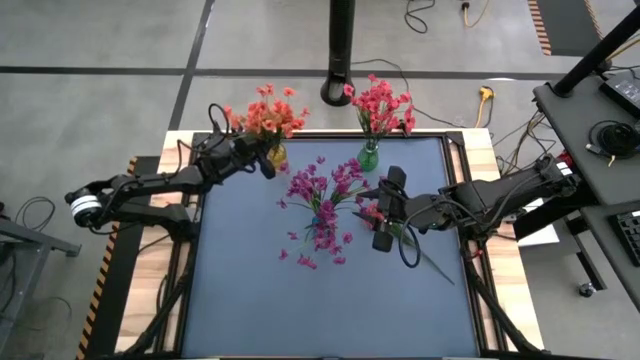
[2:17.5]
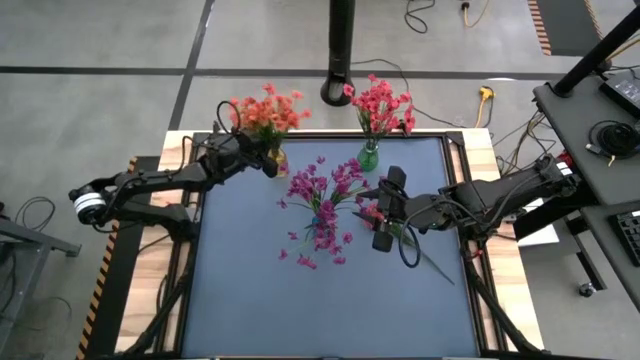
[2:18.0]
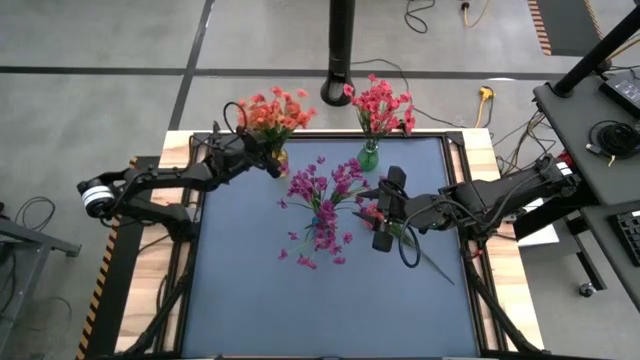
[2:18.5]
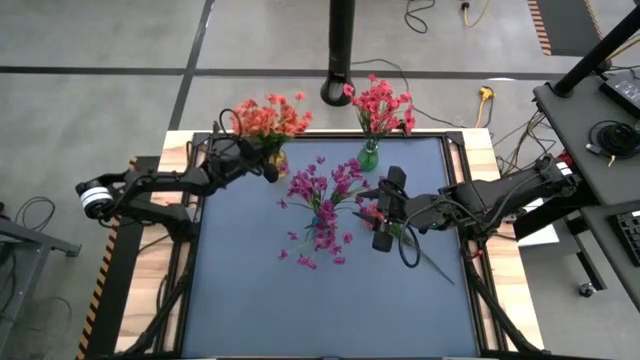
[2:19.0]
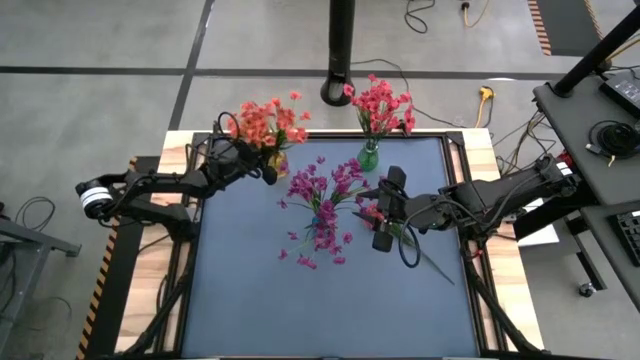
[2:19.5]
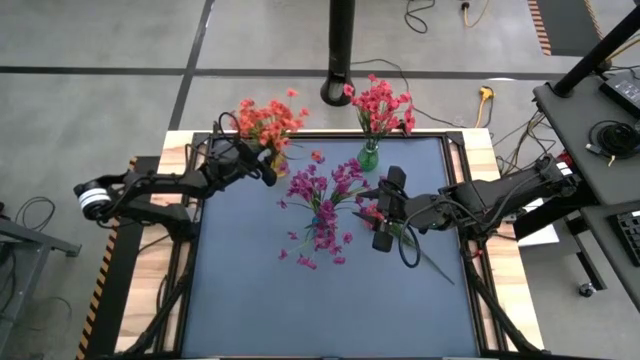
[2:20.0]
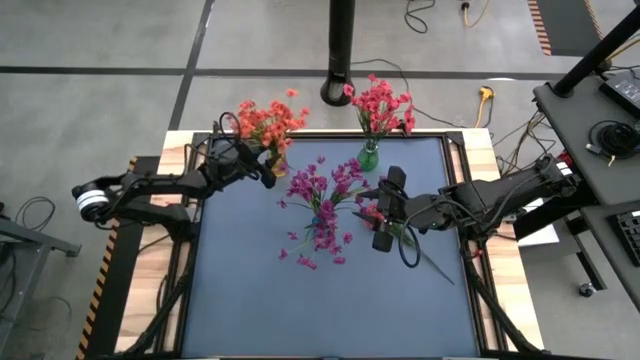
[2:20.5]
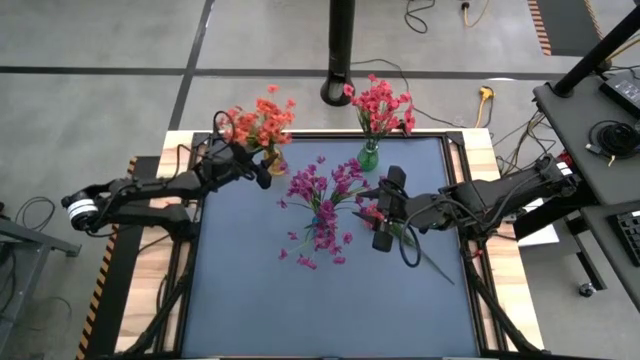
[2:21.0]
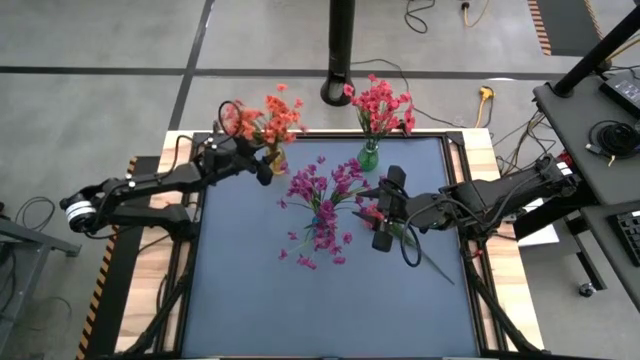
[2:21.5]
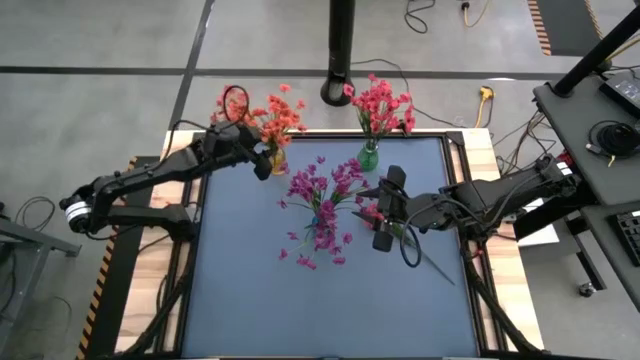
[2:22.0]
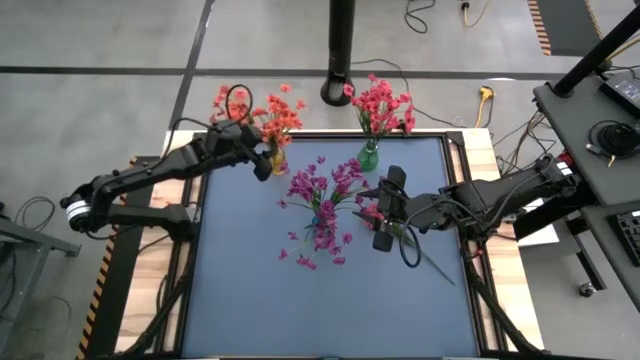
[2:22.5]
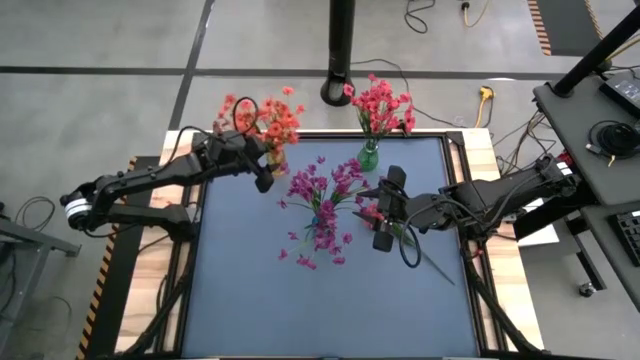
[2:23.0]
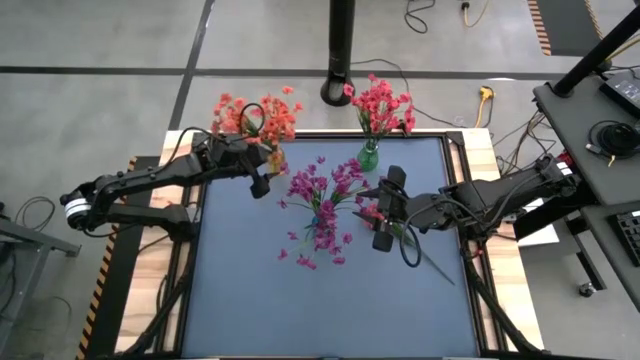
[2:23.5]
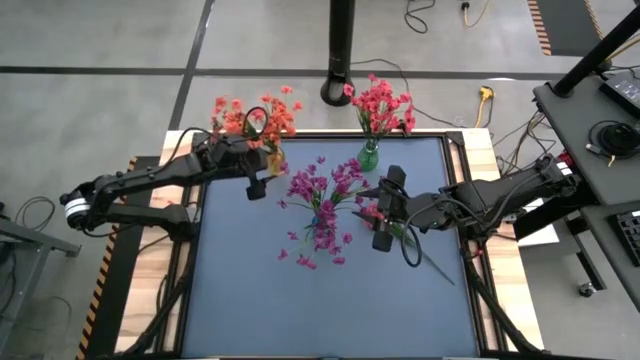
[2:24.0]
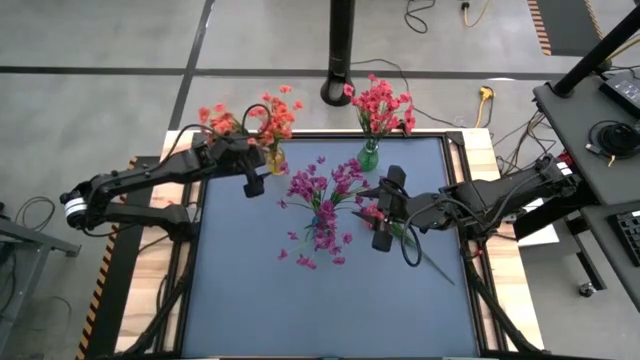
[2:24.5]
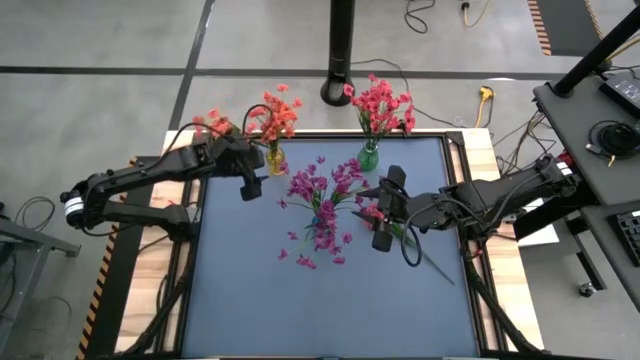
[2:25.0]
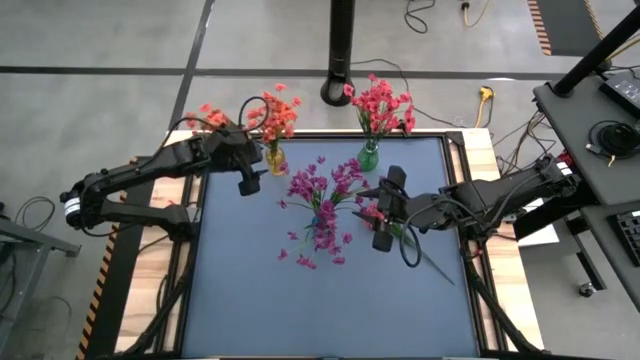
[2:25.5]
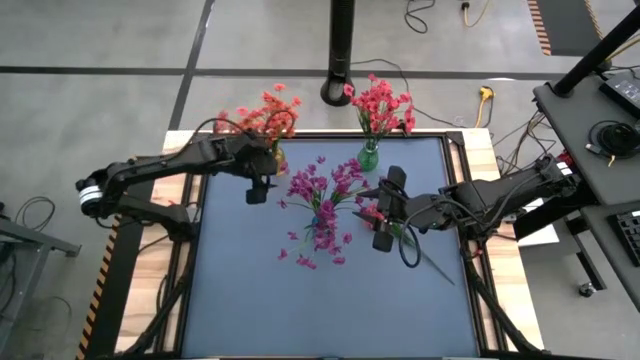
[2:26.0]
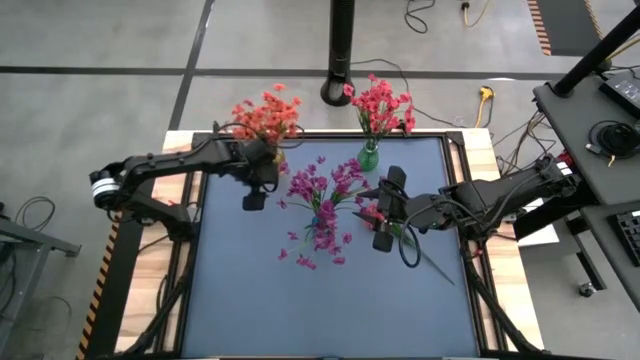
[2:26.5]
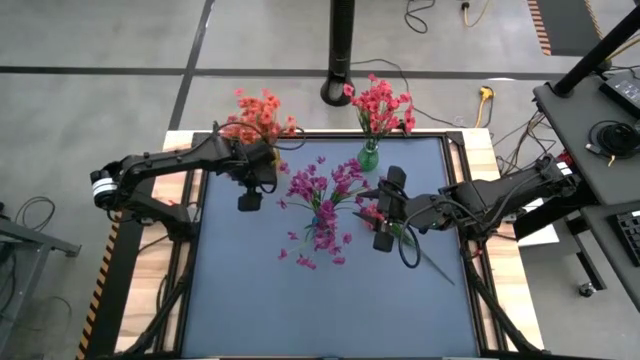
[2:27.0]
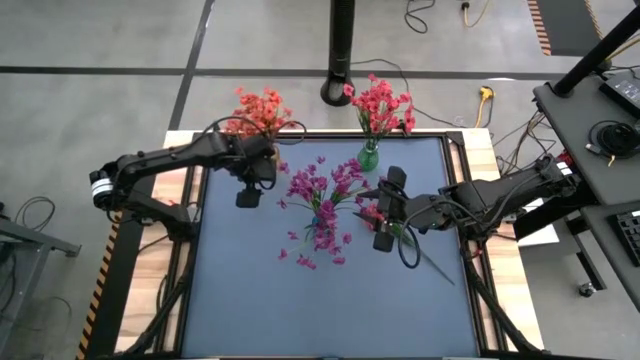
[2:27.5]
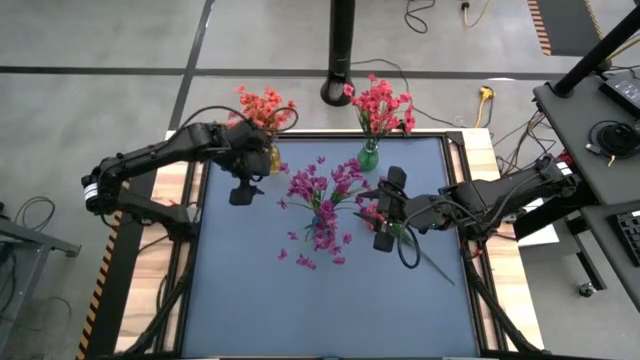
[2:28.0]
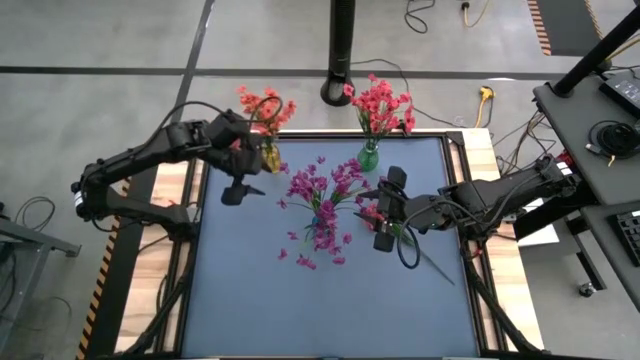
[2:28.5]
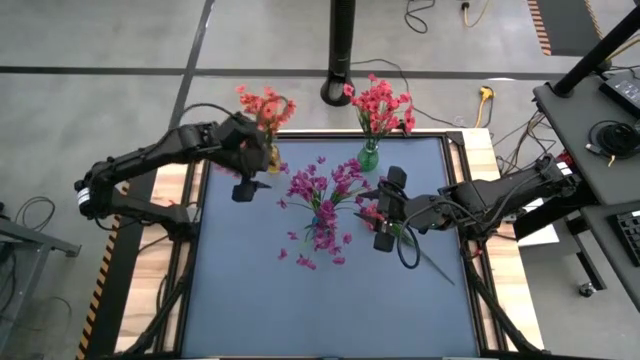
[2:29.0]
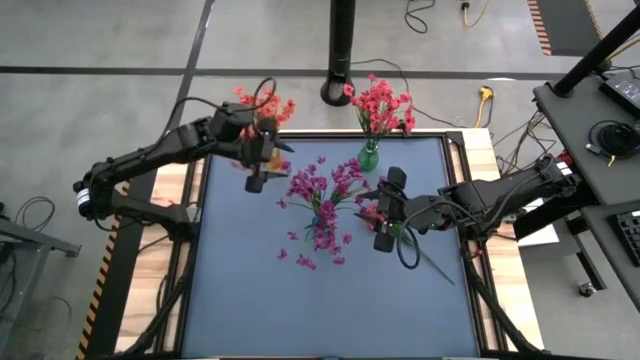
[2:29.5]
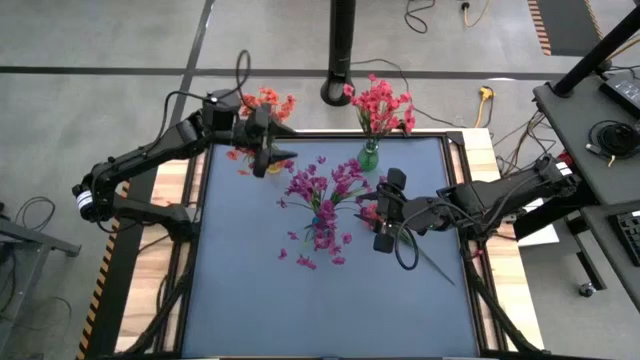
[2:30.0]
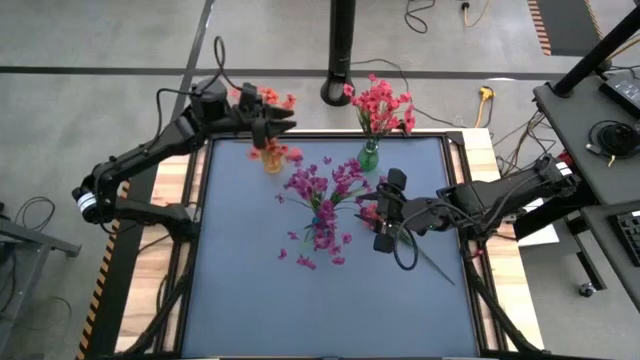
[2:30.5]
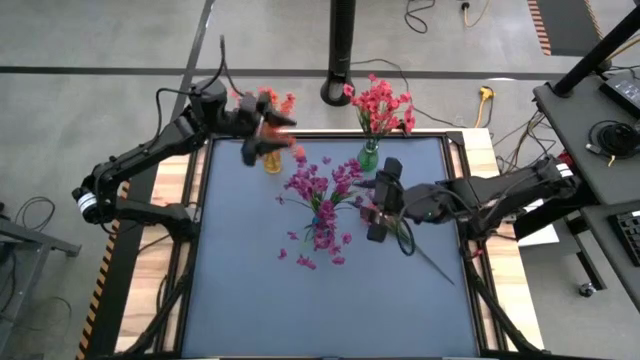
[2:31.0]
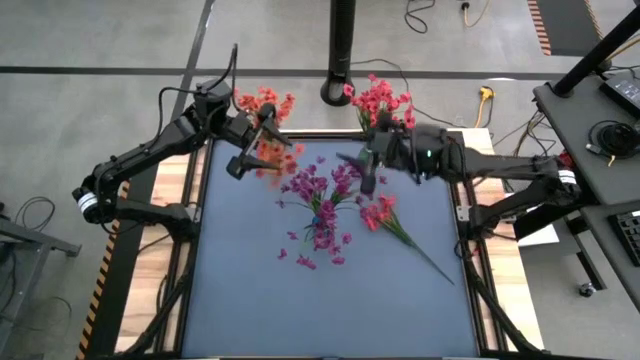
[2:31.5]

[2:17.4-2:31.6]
Task: Sort flowers into vase by color
Put the orange flower into the yellow vase

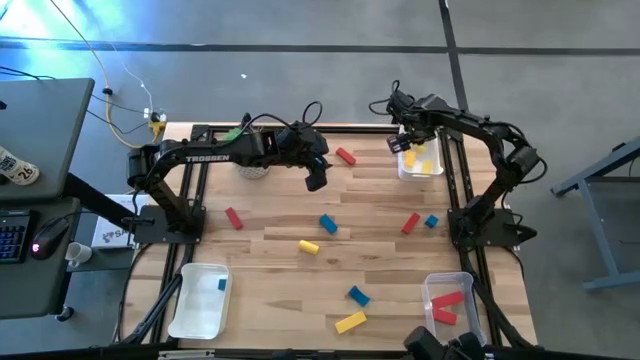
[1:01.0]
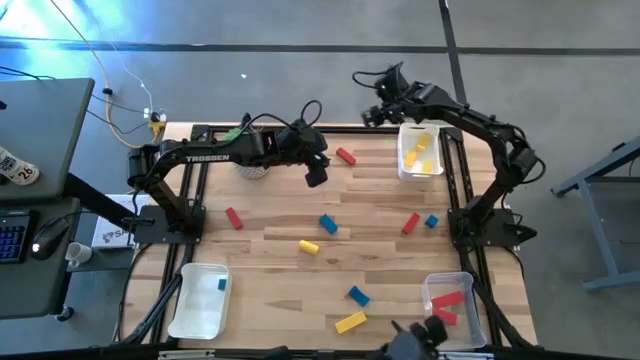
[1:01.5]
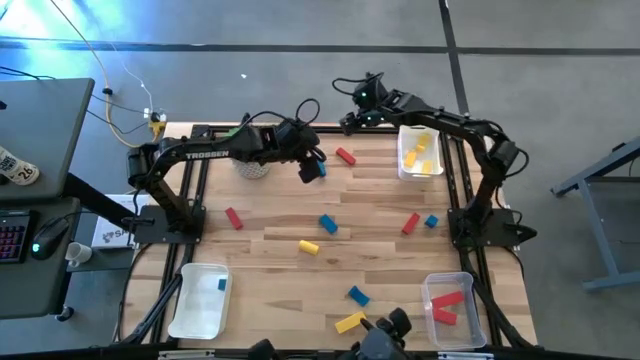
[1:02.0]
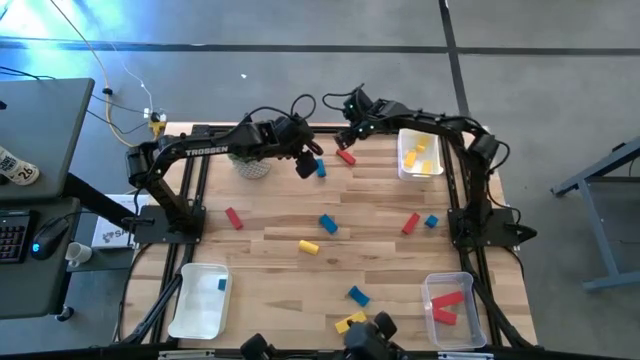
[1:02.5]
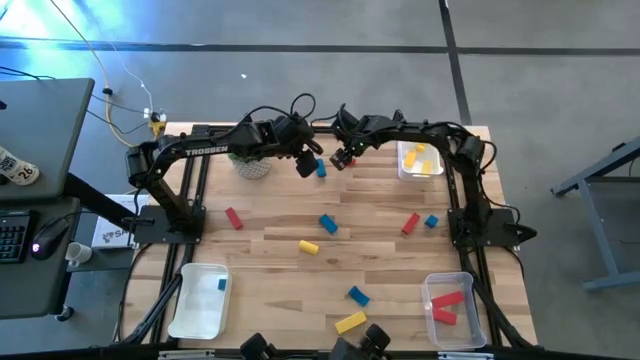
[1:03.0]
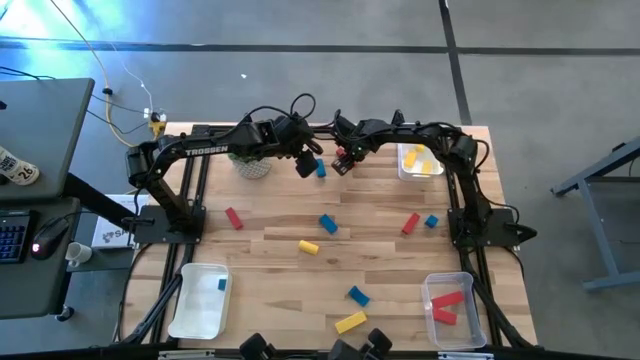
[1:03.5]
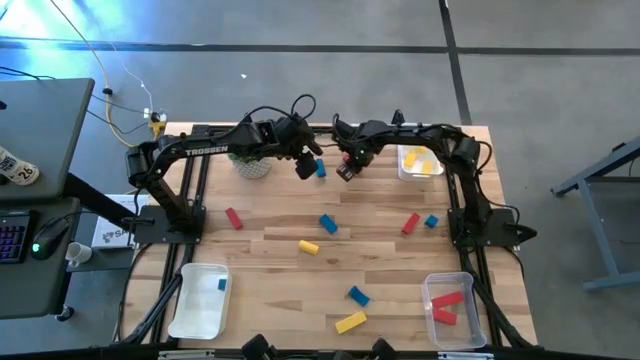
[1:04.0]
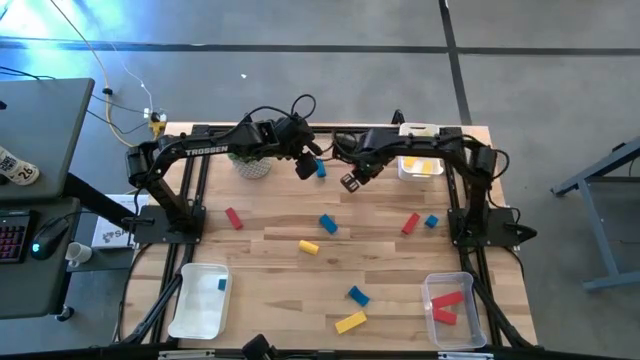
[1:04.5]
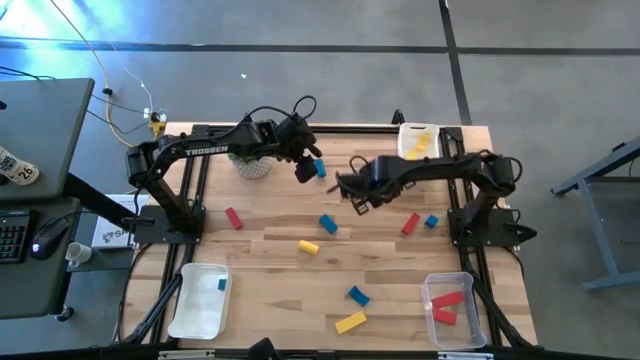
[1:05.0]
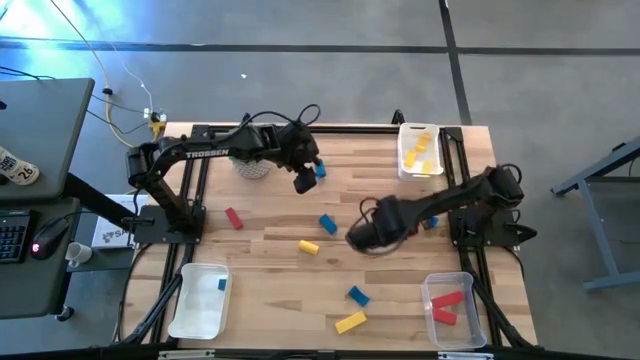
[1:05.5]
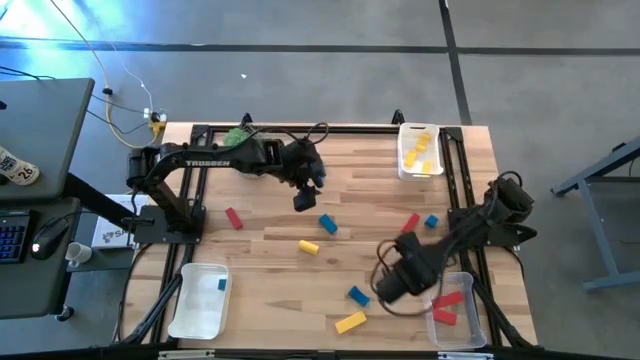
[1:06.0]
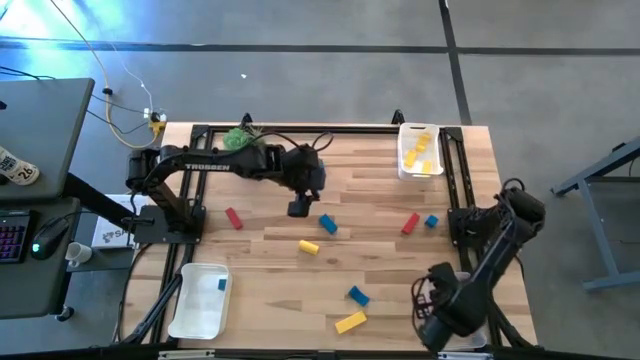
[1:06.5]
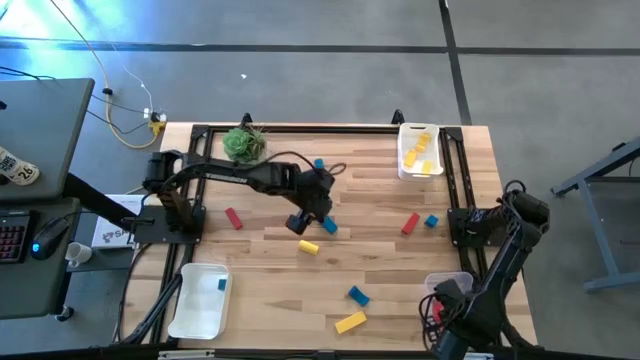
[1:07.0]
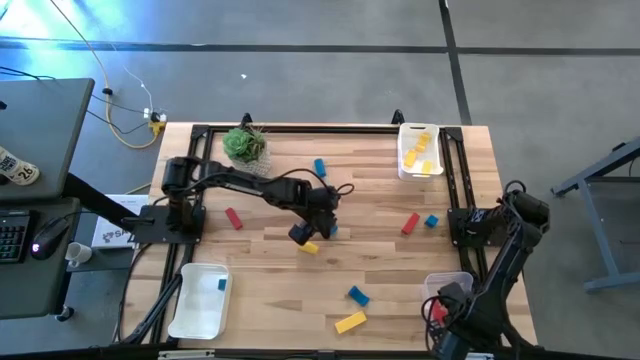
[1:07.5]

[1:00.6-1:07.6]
Task: Sort & place blocks by color
Put the red block into the transparent bin
